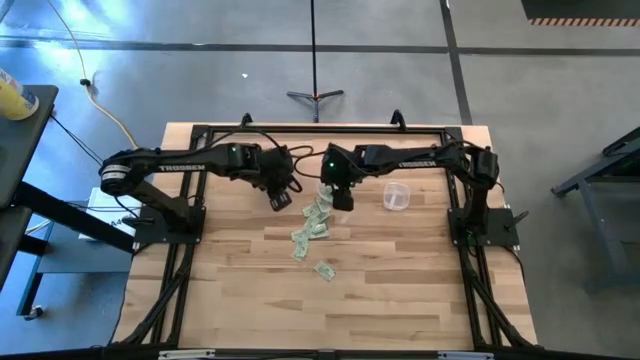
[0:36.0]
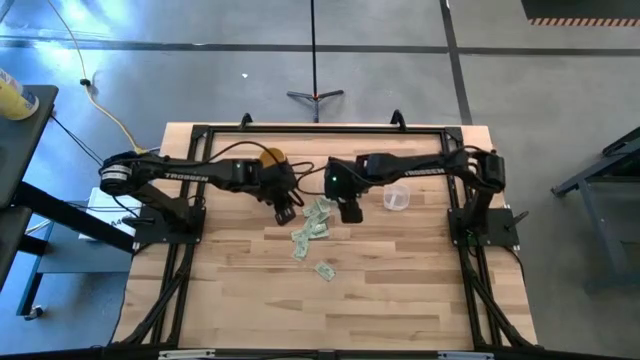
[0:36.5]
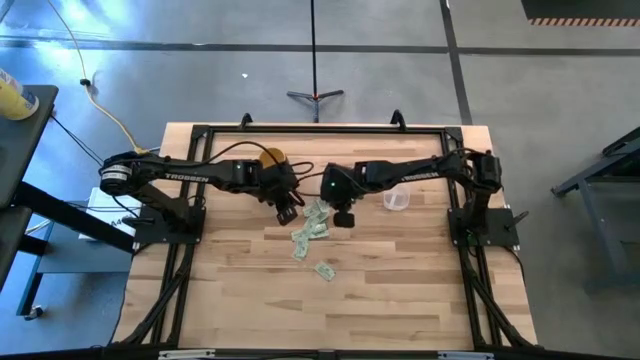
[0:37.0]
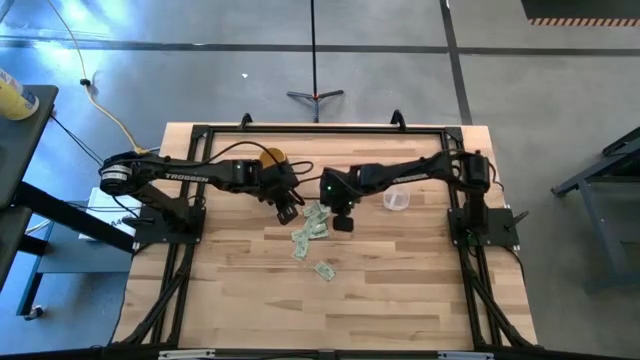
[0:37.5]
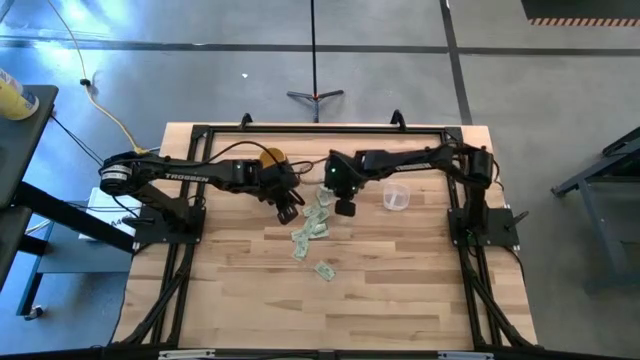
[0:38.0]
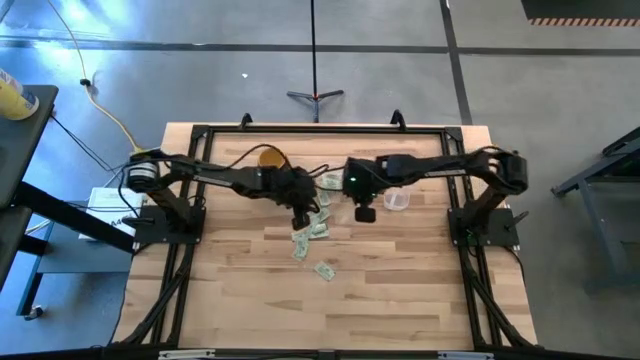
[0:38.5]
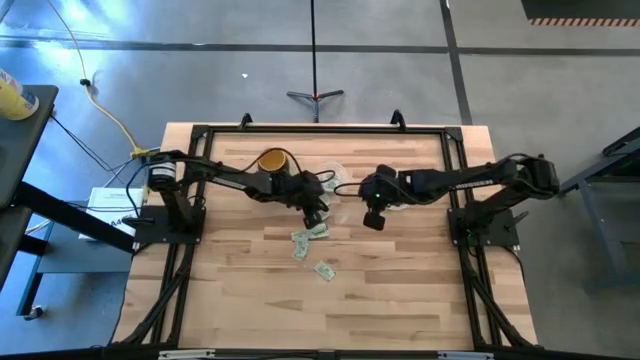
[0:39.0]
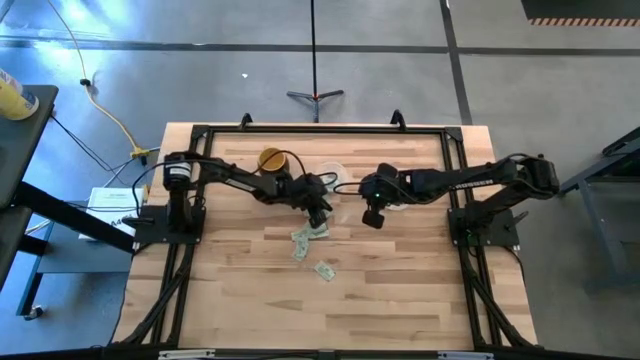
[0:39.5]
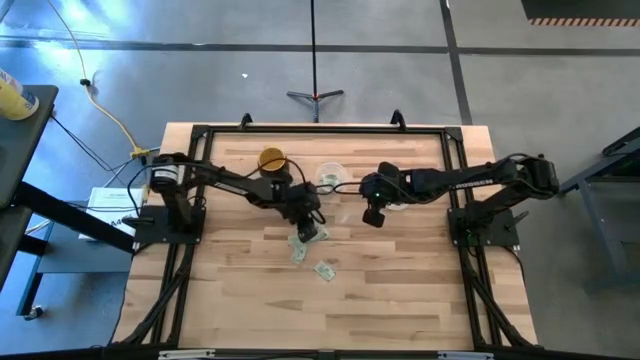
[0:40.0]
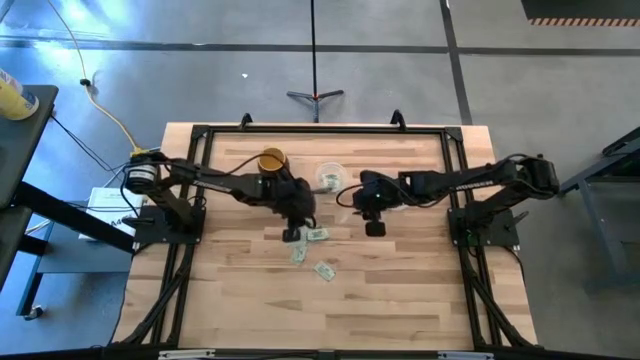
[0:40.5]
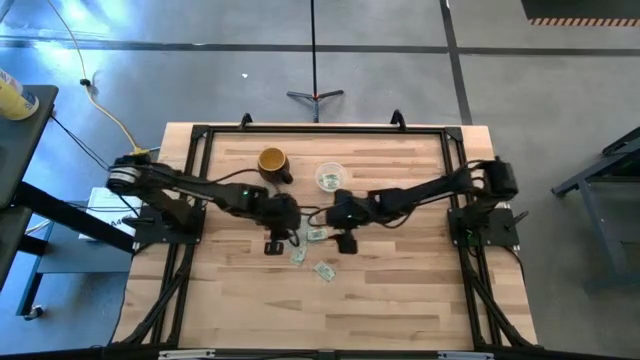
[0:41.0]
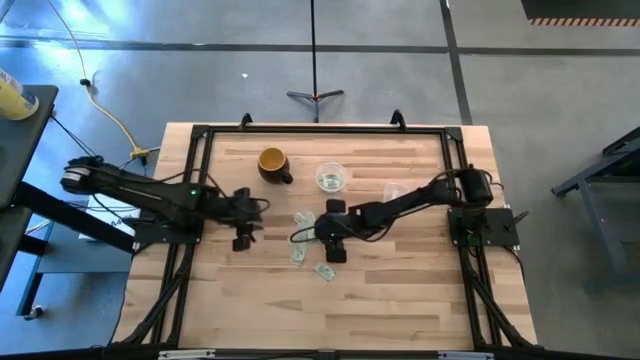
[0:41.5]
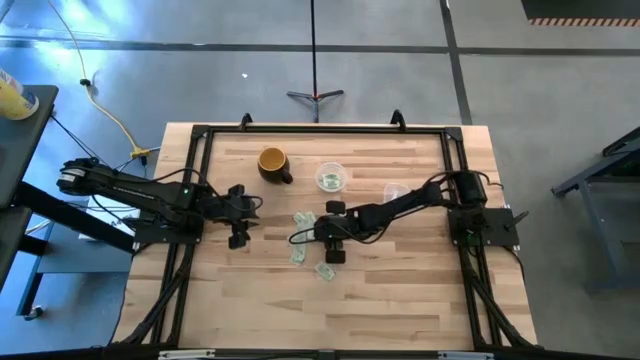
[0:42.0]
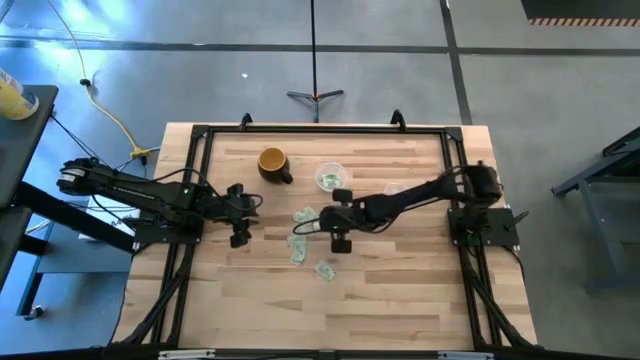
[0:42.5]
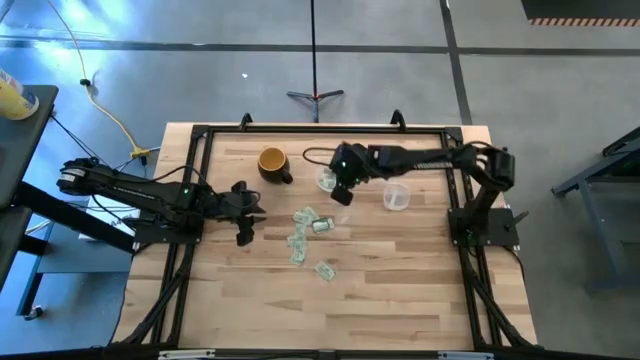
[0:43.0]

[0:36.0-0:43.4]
Task: Pick and place items into bin
Put the light green stevia packet into the left transparent bin

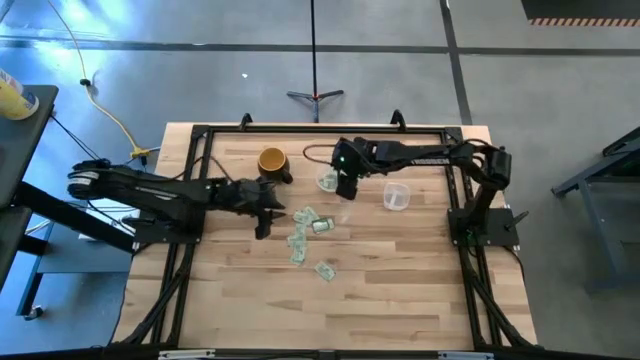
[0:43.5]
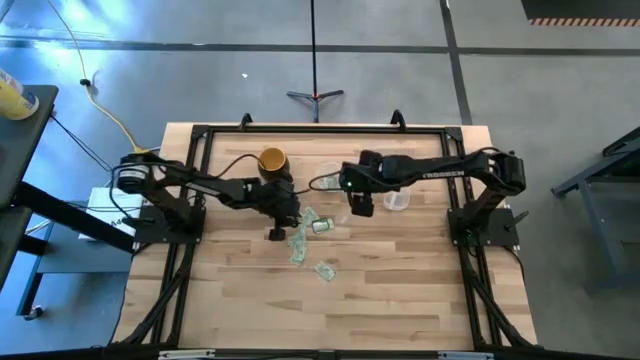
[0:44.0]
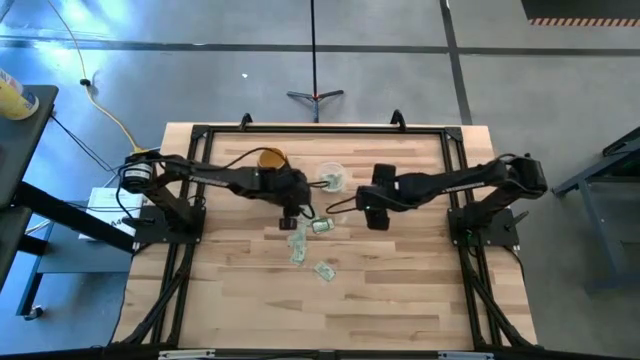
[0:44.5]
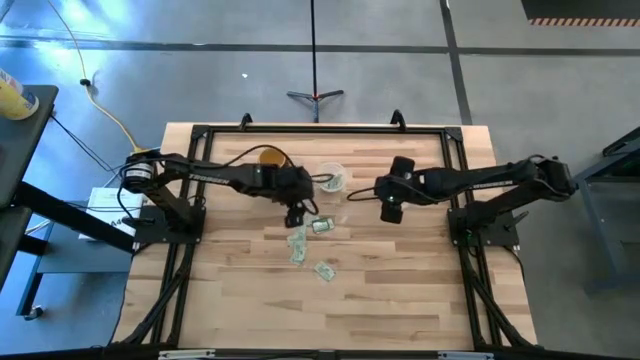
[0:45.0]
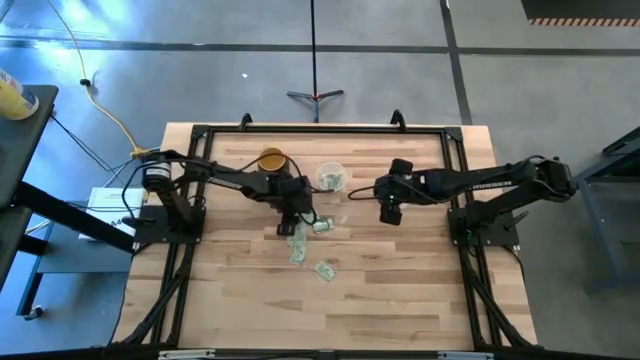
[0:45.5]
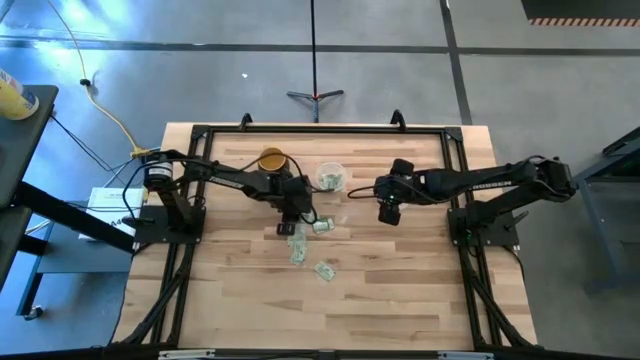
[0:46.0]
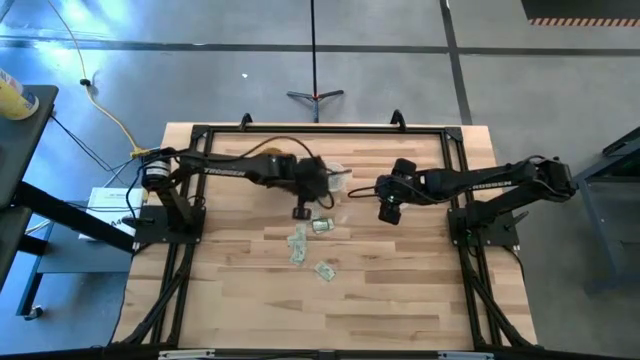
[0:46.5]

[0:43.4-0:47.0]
Put the light green stevia packet into the left transparent bin

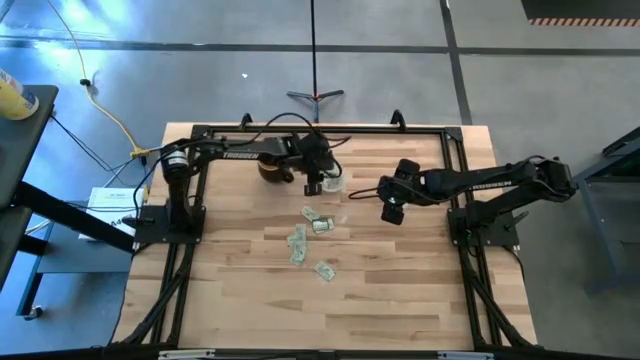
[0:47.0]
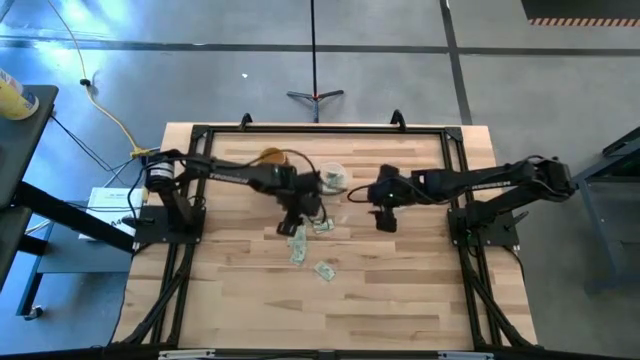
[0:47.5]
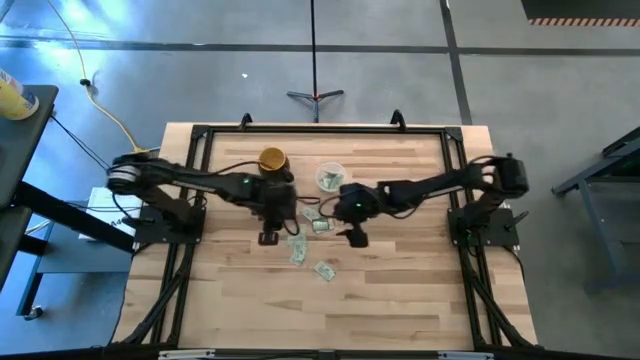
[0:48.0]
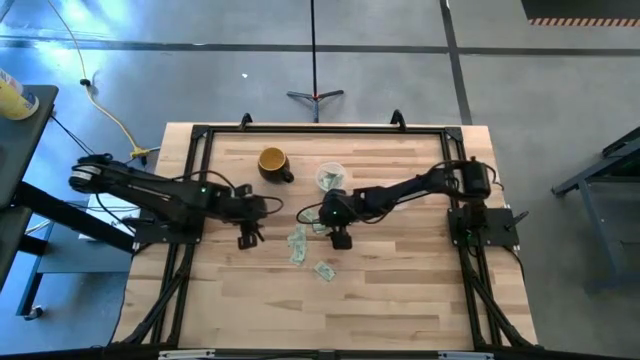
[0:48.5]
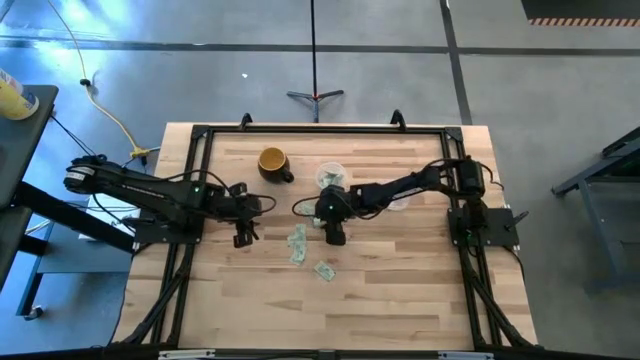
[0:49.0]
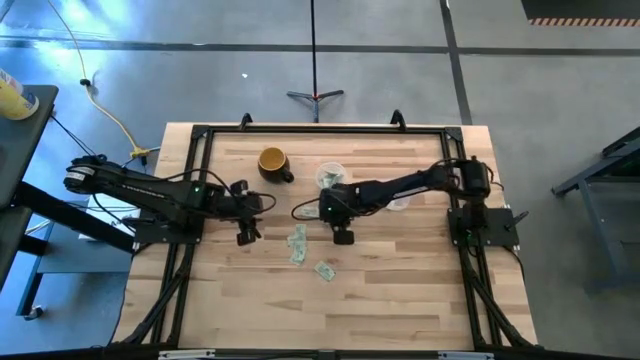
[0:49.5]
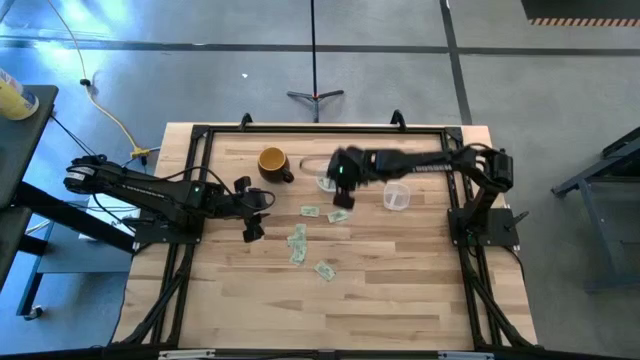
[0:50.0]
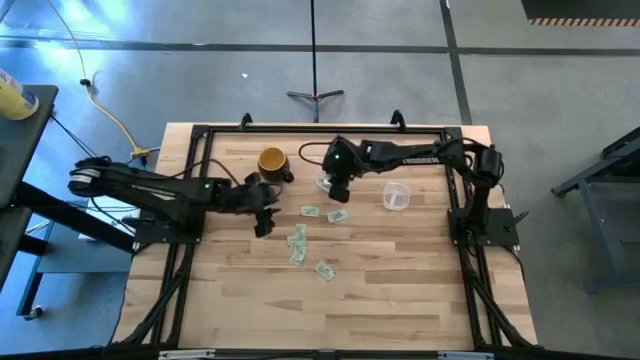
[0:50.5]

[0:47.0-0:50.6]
Put the green truvia packet into the left transparent bin

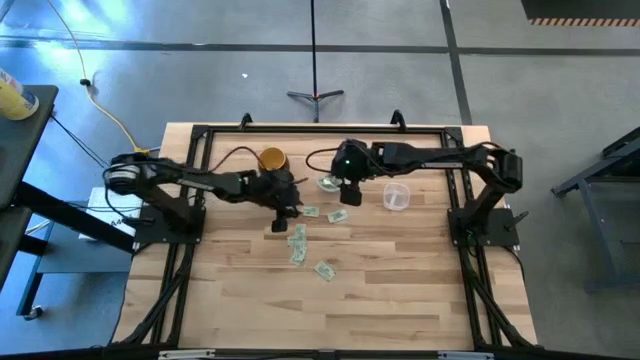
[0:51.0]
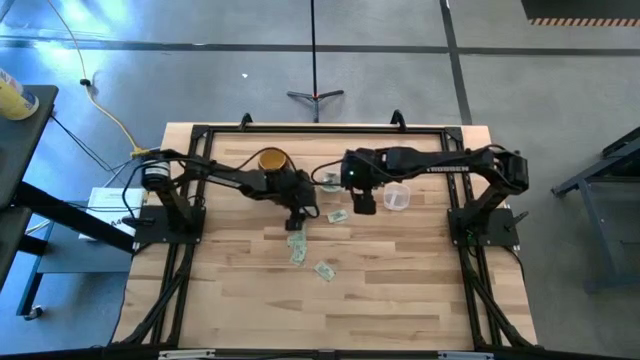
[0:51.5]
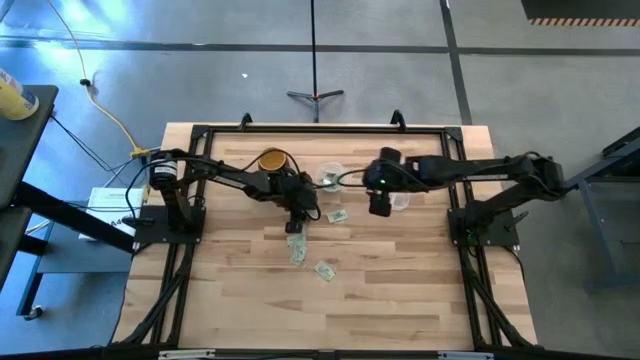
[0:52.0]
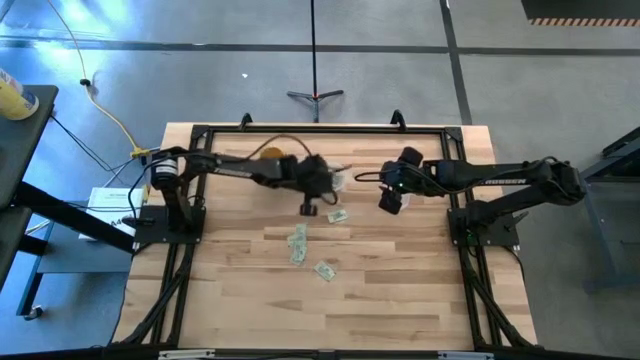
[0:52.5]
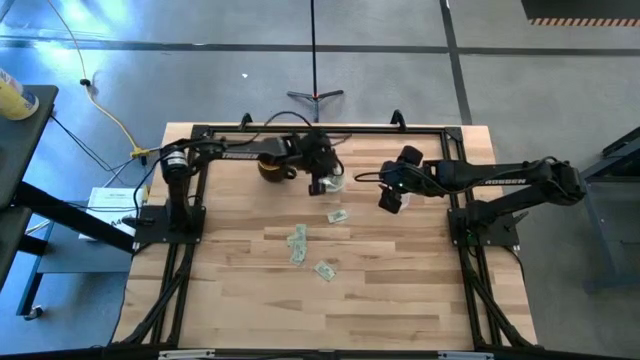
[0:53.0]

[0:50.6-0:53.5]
Put the light green stevia packet into the left transparent bin

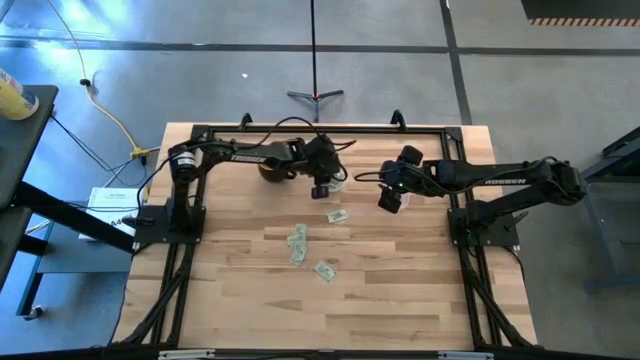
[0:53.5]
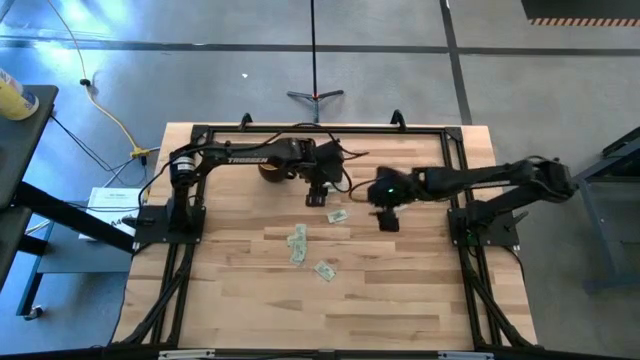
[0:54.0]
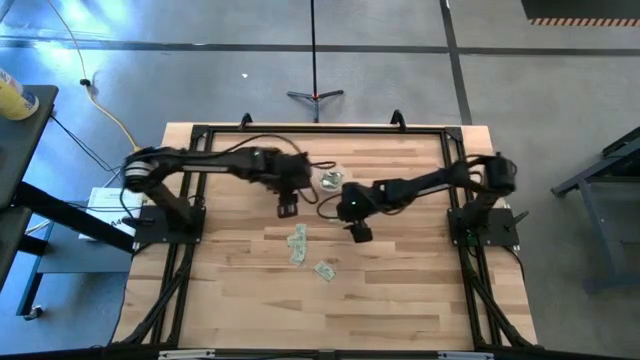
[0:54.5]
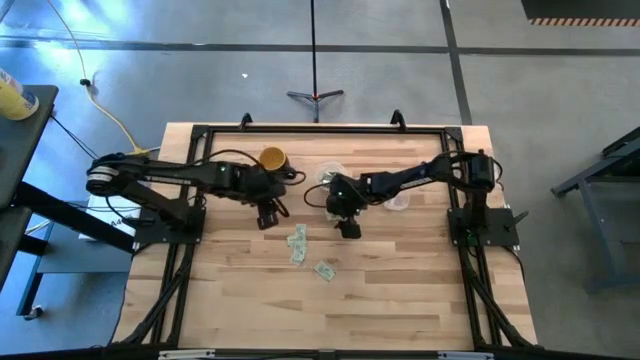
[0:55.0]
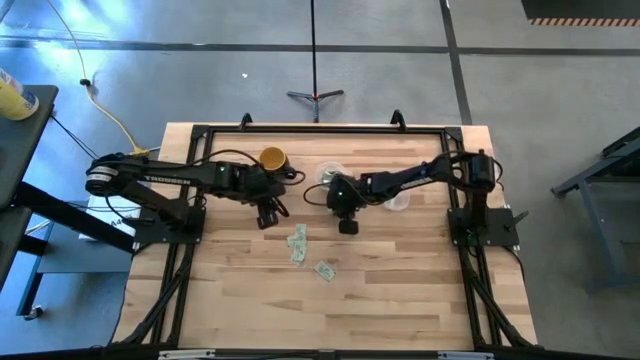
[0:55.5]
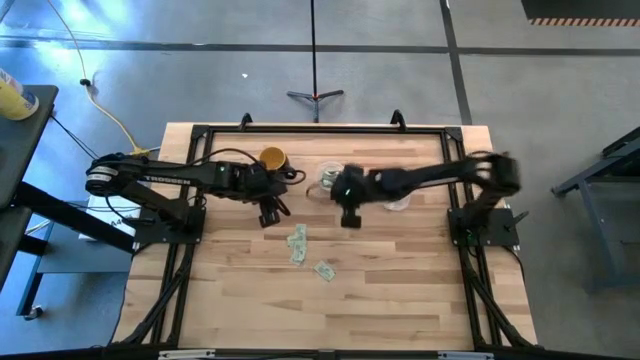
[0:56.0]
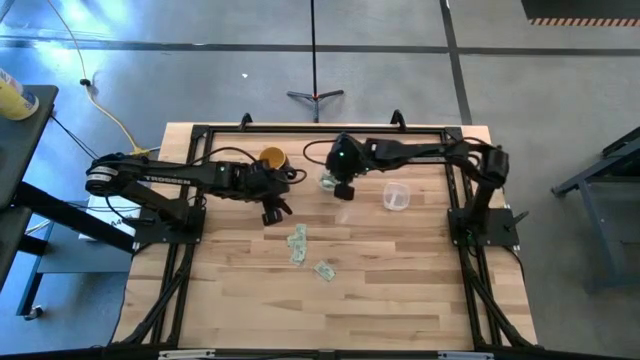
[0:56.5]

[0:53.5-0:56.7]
Put the light green stevia packet into the left transparent bin
